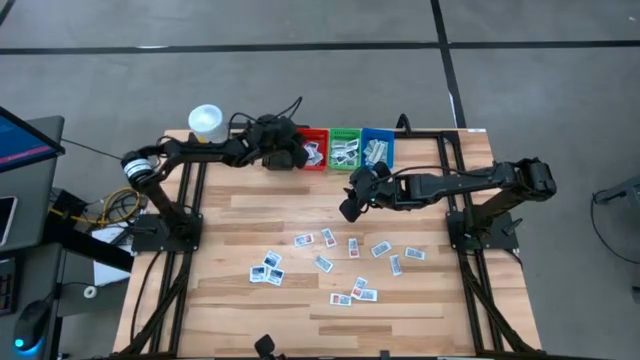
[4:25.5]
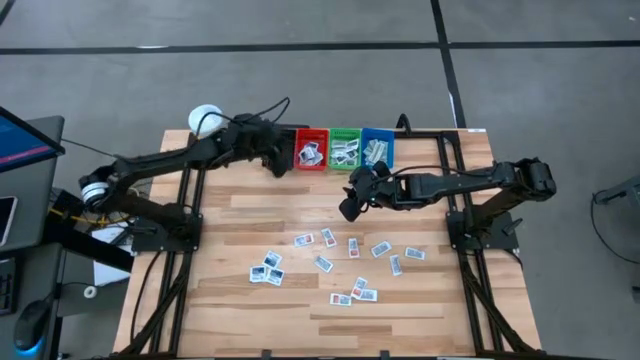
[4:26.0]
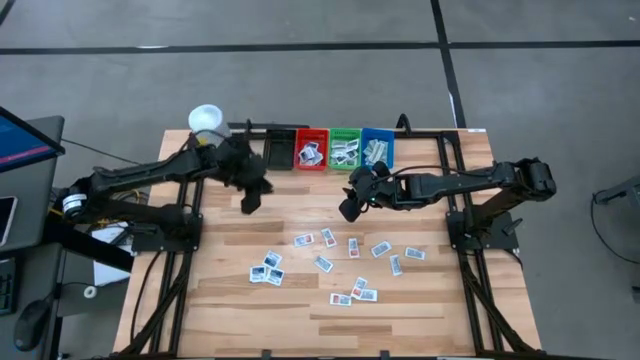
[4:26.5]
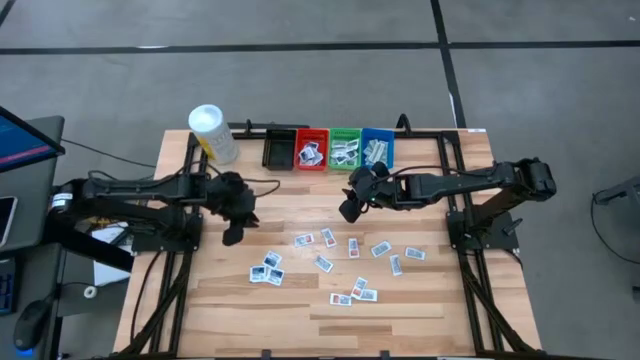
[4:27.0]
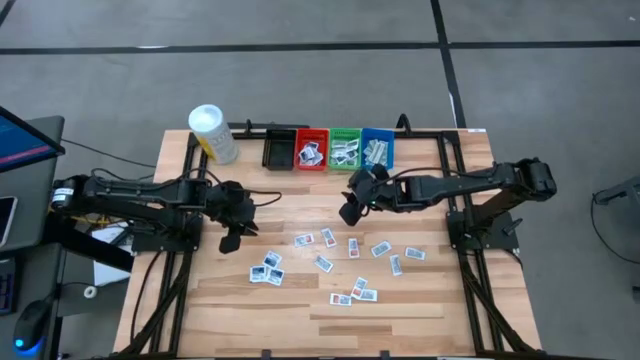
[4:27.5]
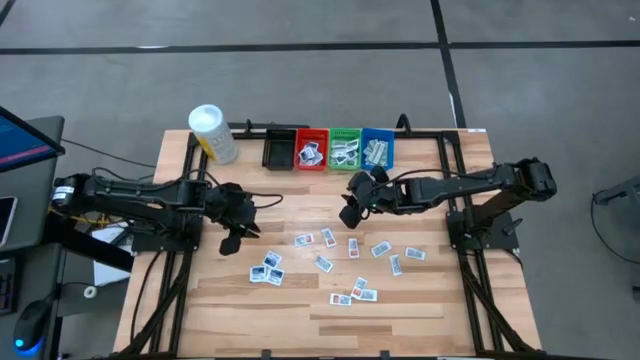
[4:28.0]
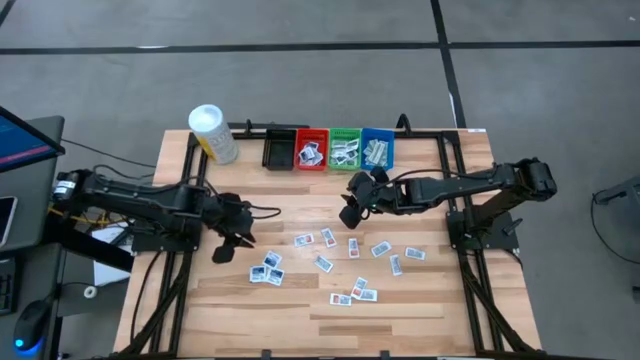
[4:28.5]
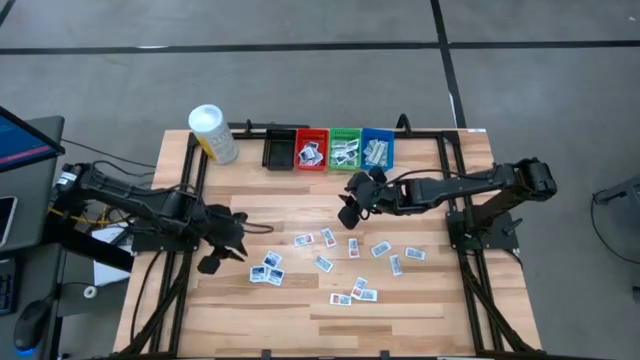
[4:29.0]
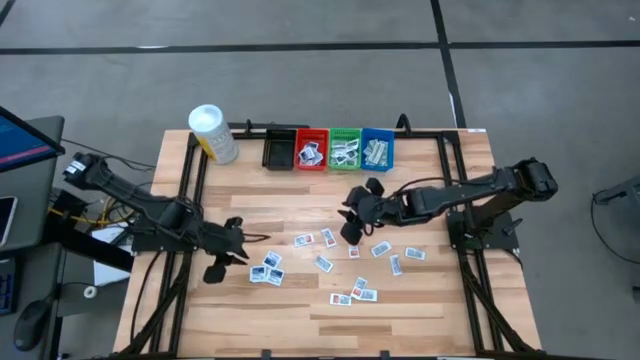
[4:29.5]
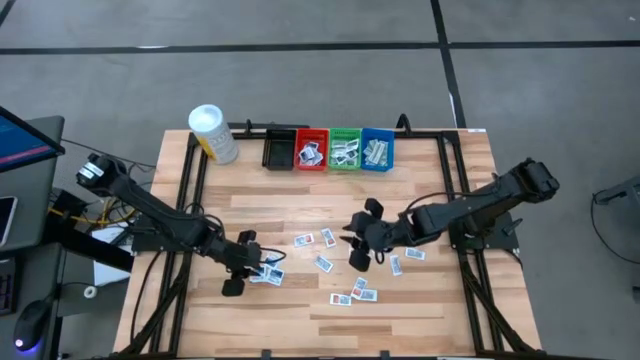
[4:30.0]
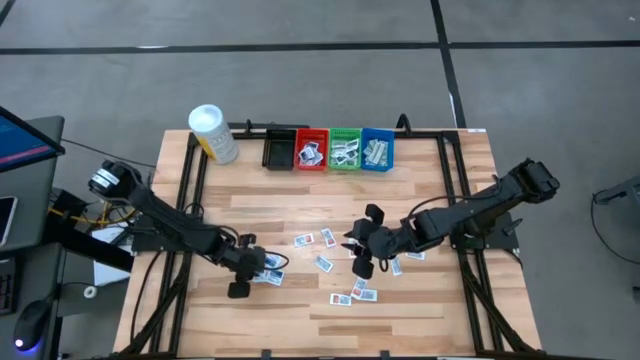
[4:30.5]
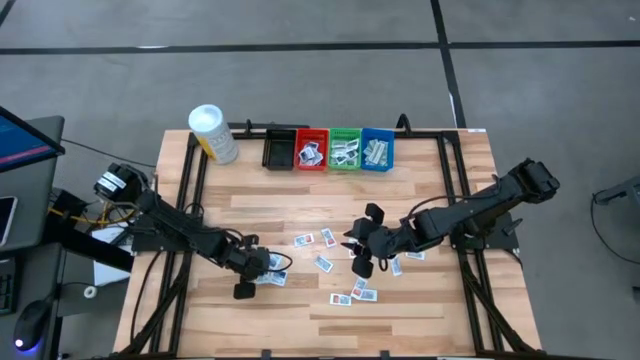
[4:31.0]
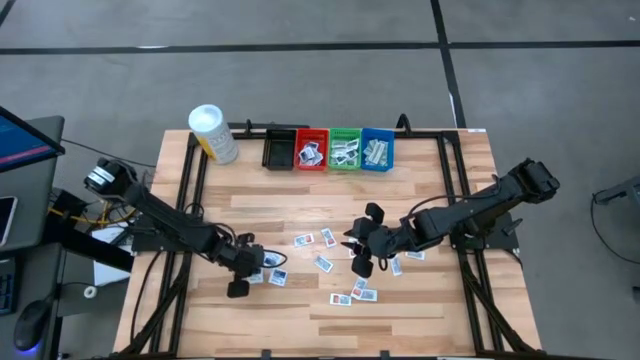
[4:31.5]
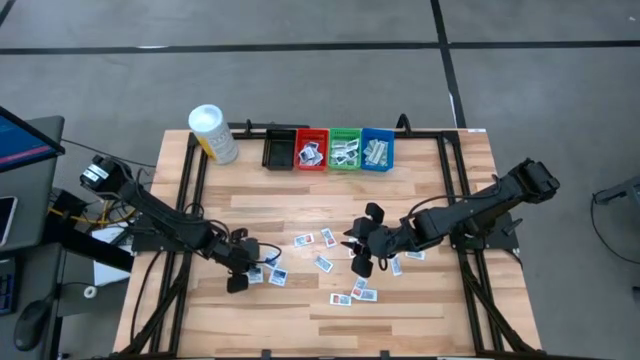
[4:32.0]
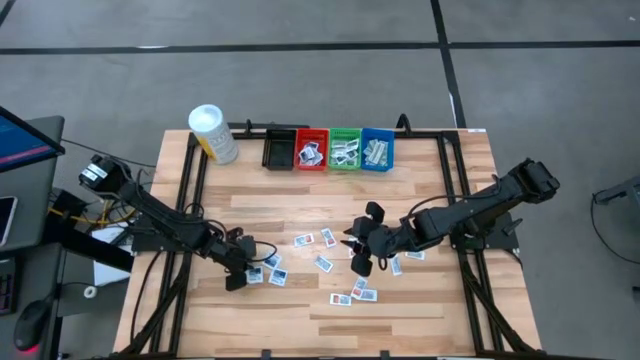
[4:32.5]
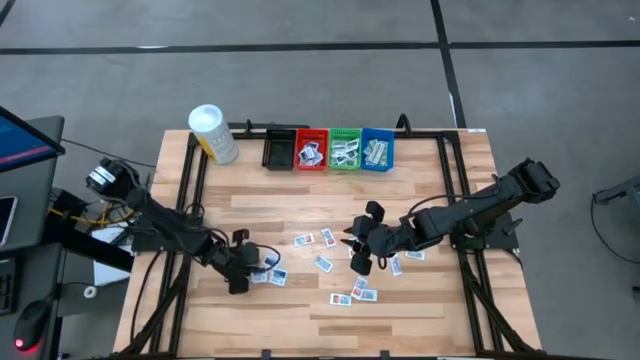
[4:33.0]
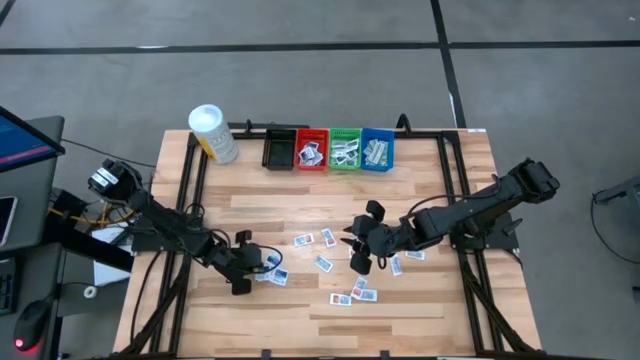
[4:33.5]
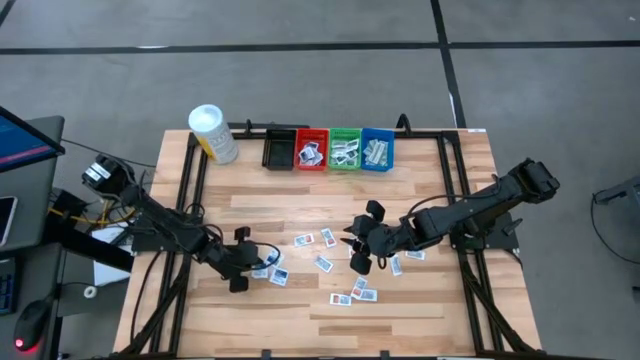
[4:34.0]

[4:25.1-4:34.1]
Task: Pick & Place First Aid Supplies
Put the bottom left alcohol pad into the red bin

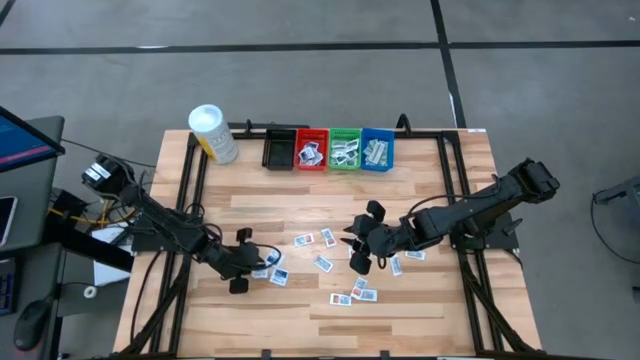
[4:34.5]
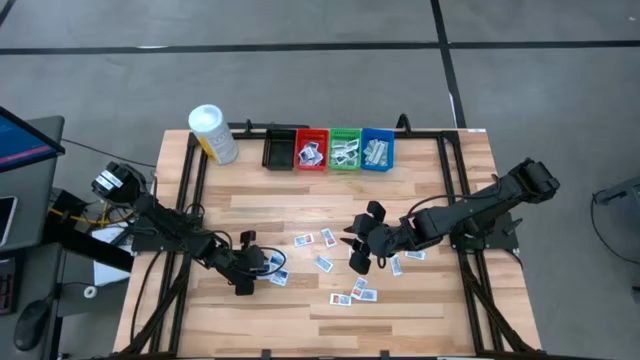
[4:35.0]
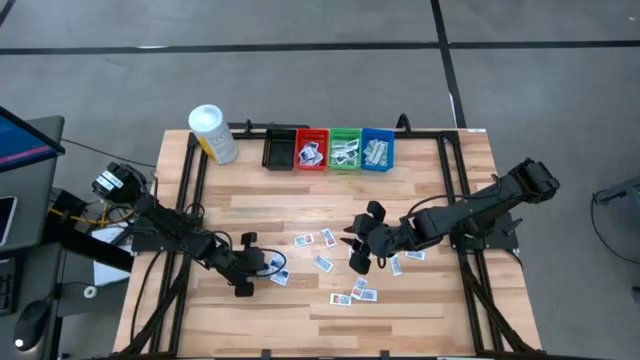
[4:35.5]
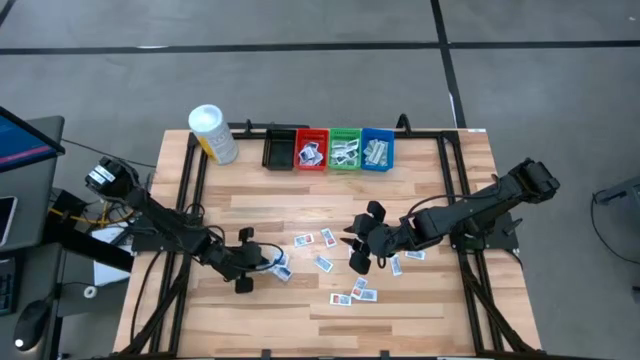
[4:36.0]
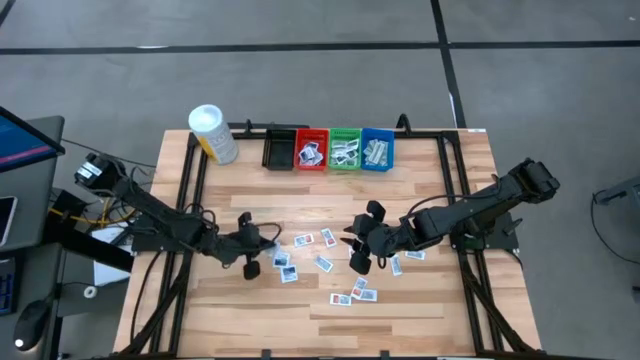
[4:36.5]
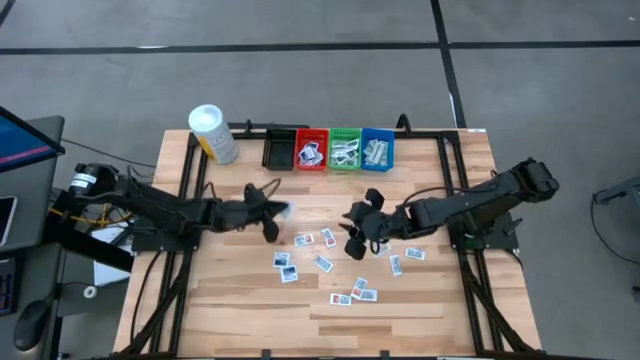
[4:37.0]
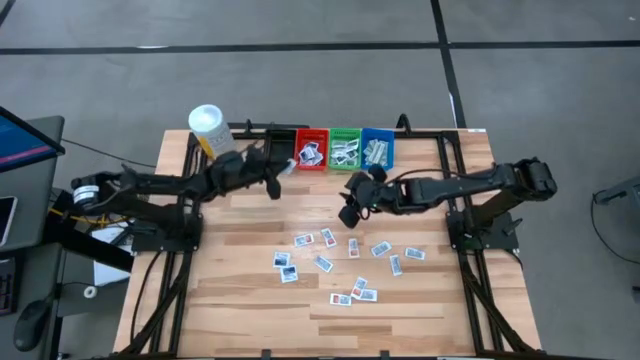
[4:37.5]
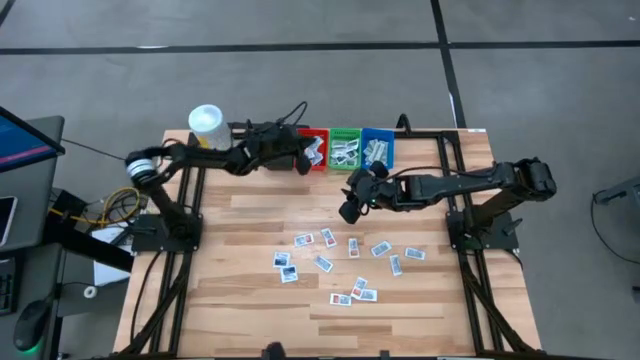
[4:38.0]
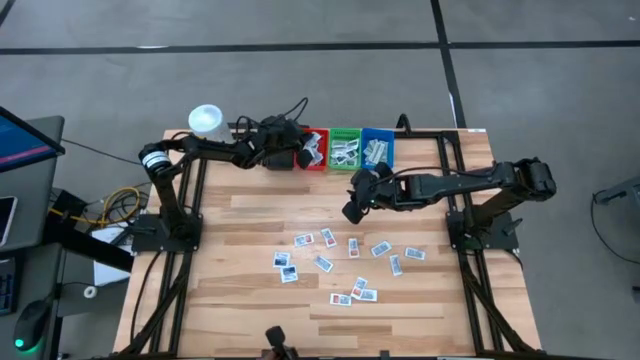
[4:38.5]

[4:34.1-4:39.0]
Put the bottom left alcohol pad into the red bin

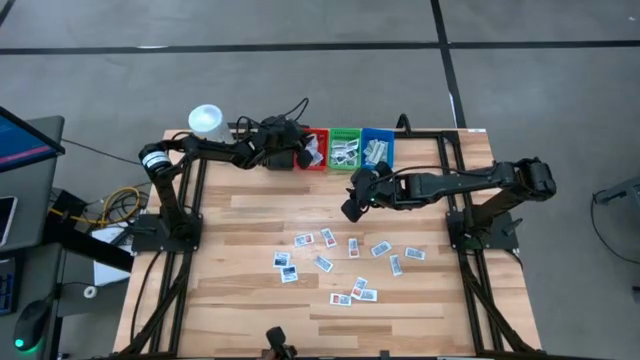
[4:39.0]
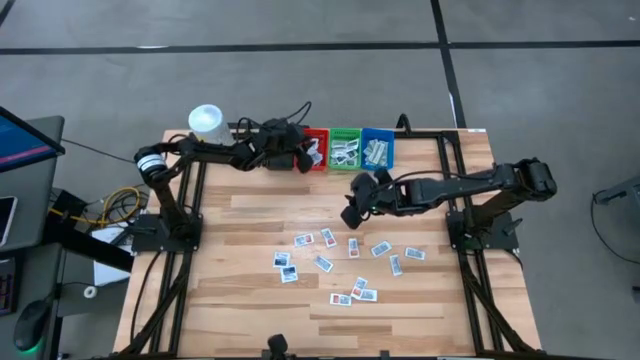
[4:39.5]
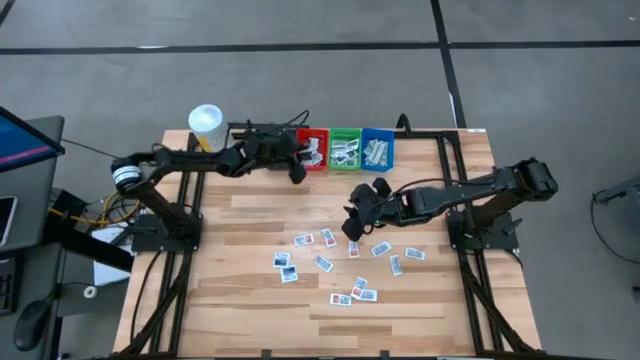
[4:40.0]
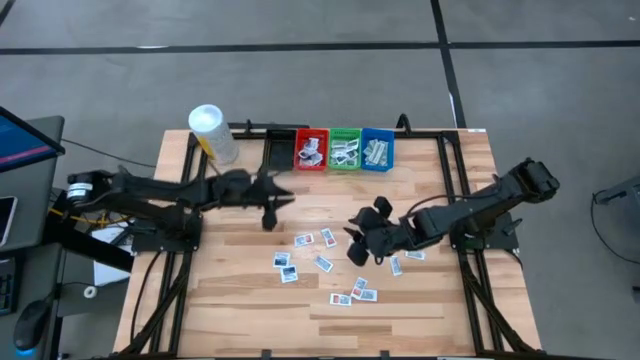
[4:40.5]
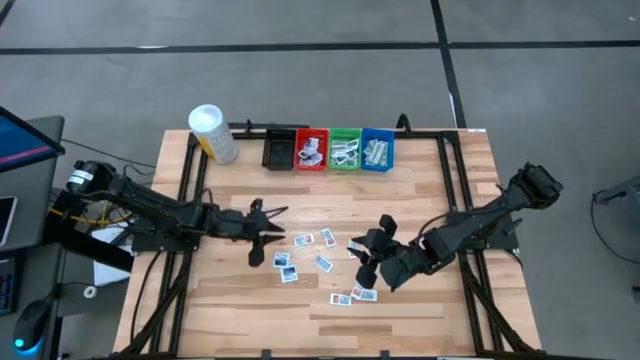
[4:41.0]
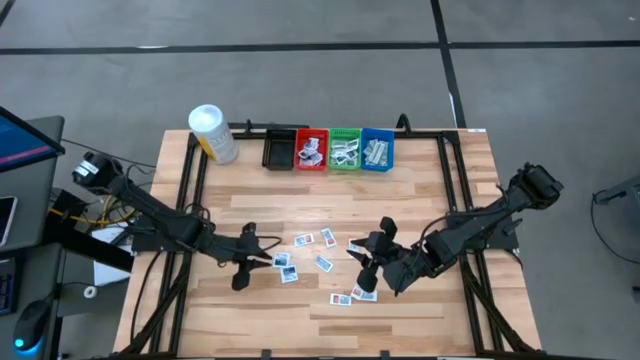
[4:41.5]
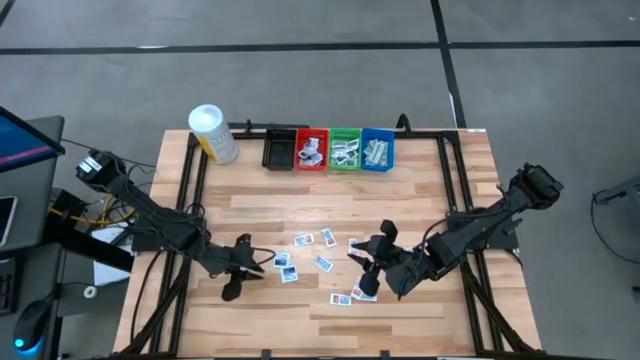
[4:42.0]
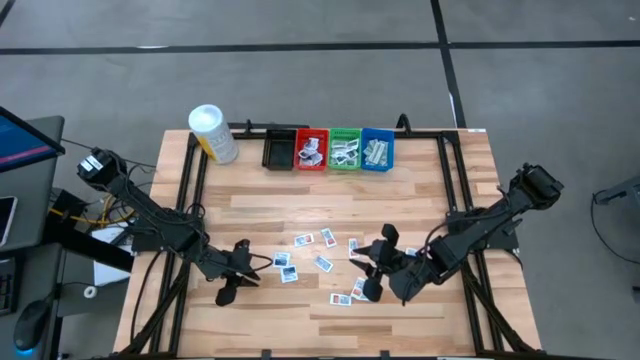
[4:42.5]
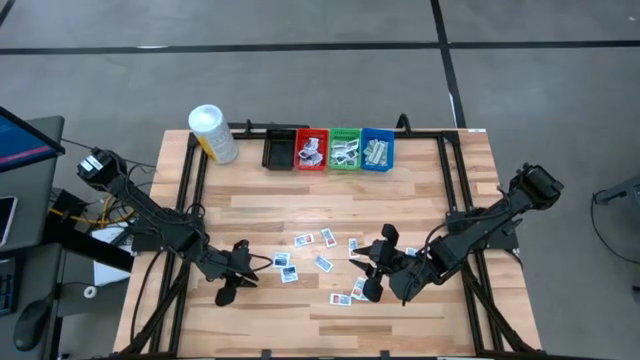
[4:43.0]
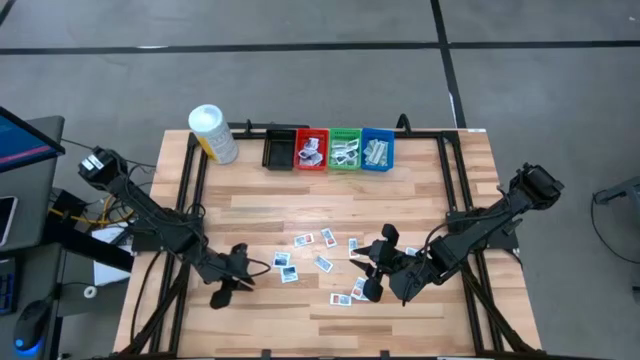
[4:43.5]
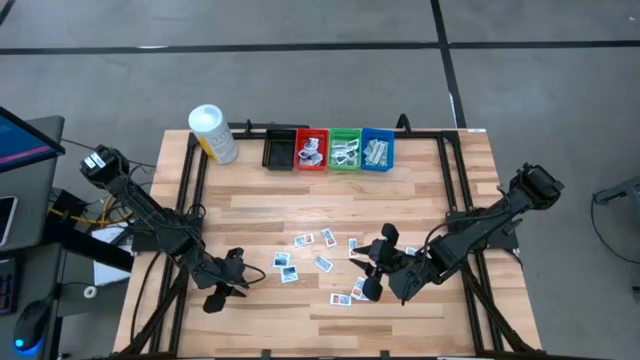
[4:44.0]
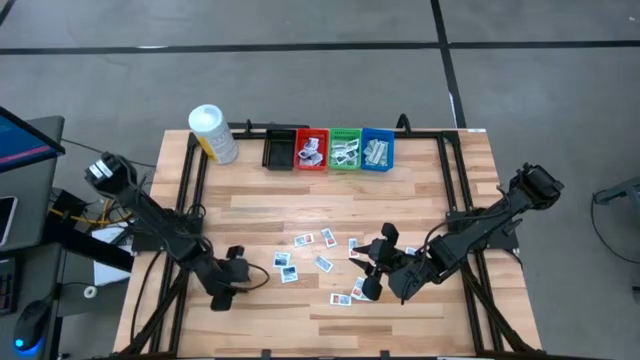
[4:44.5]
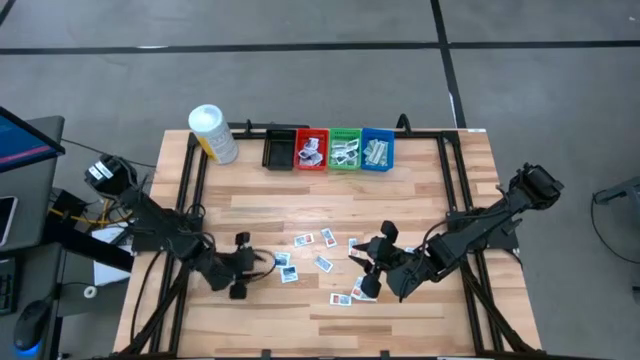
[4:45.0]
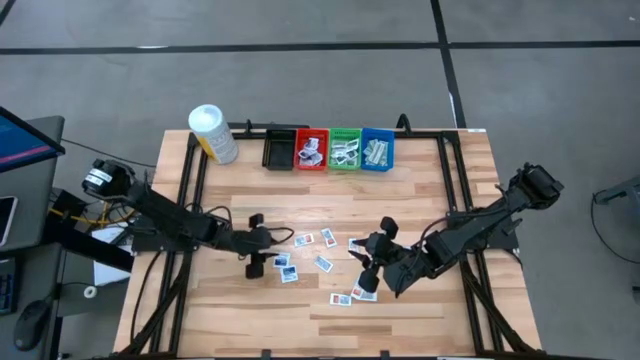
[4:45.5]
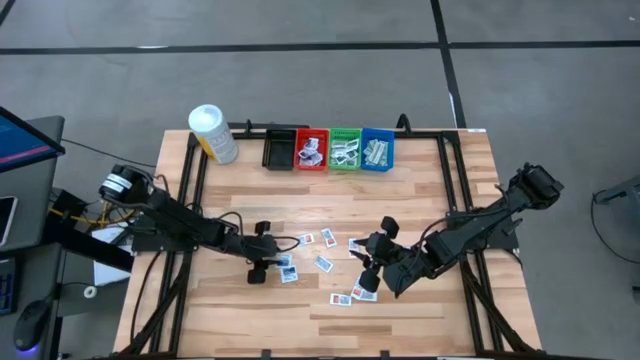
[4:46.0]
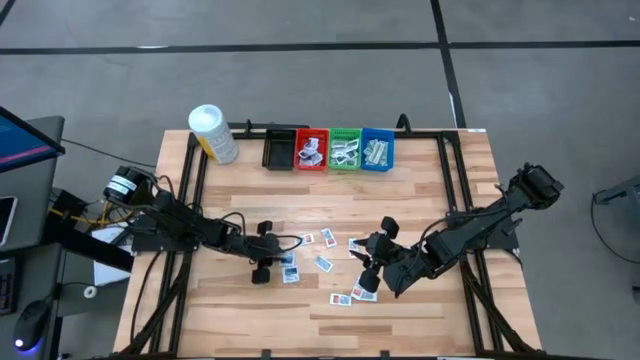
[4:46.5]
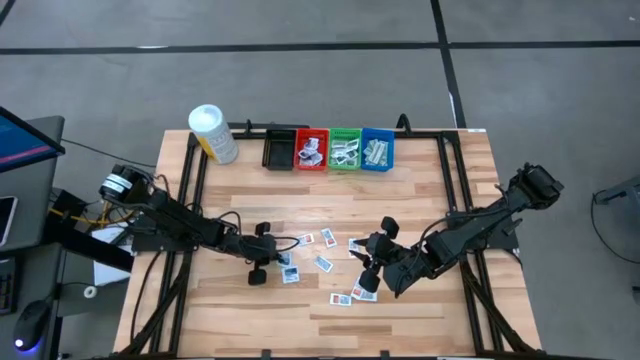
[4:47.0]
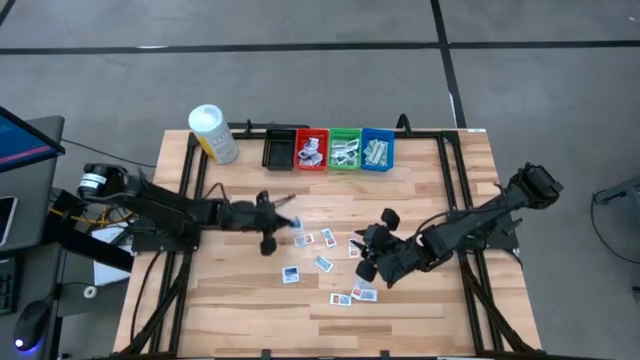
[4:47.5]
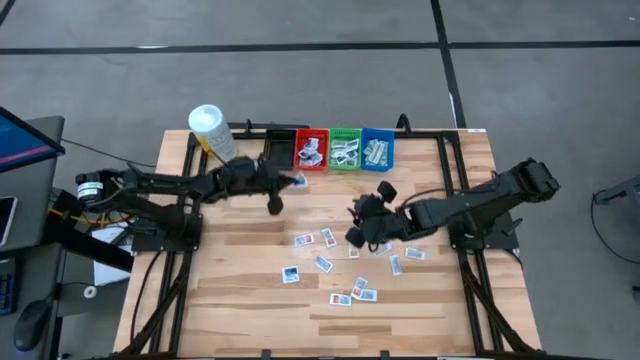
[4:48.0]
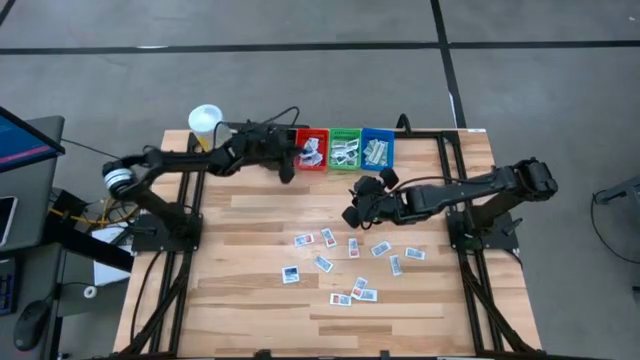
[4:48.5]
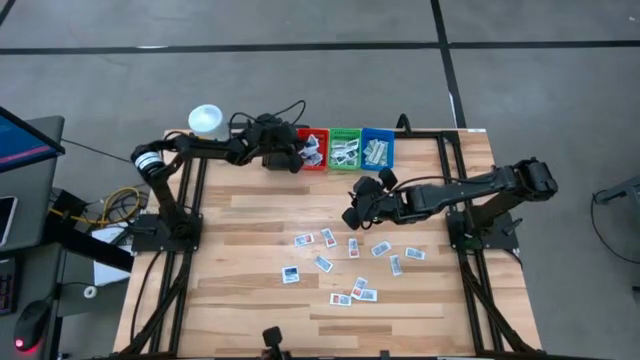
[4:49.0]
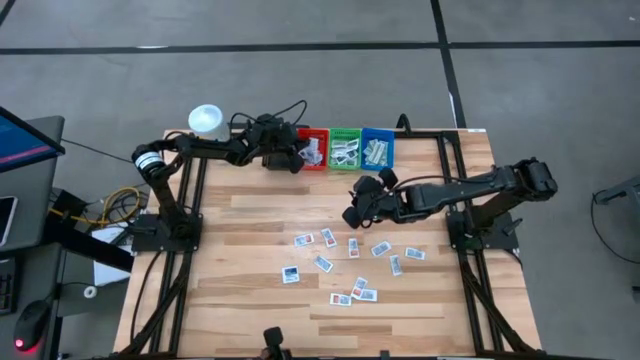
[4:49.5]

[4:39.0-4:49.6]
Put the top alcohol pad into the red bin
